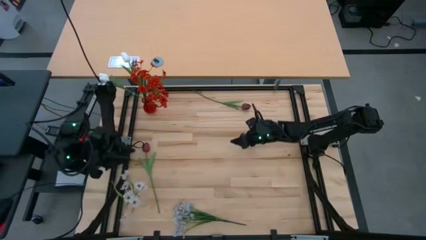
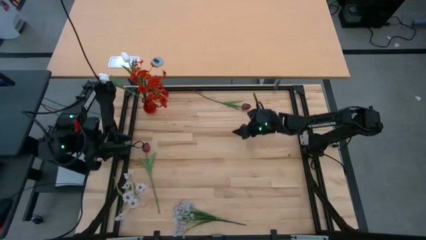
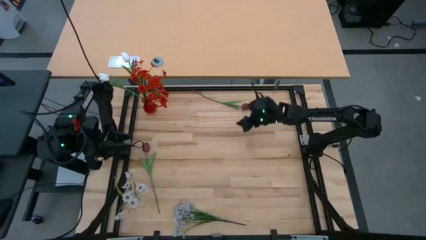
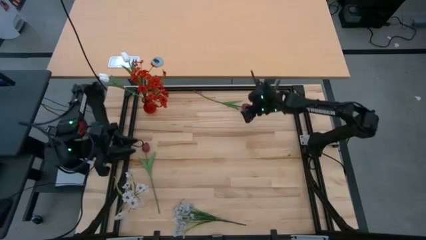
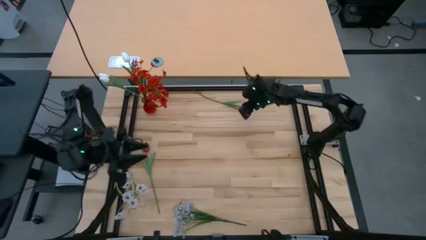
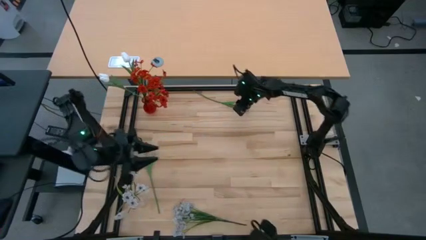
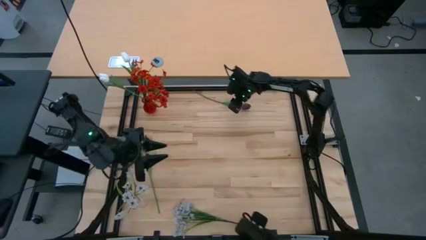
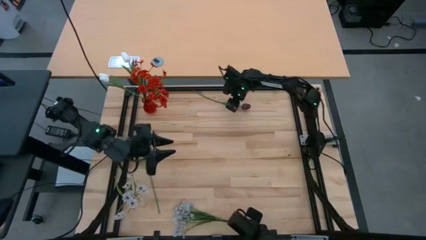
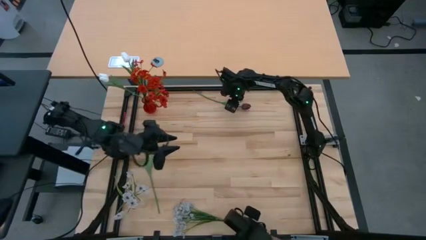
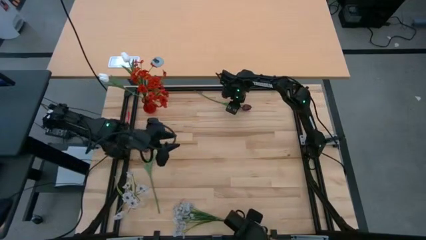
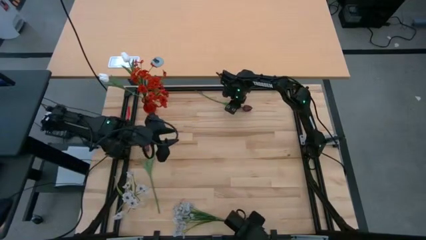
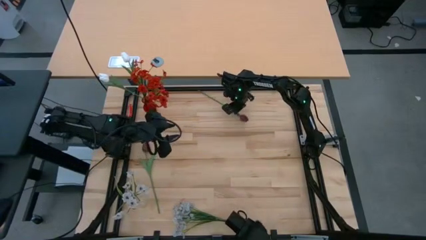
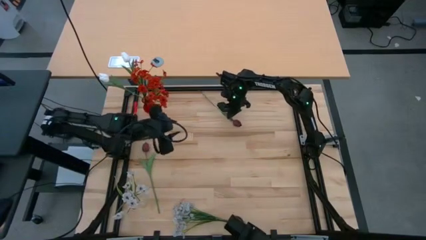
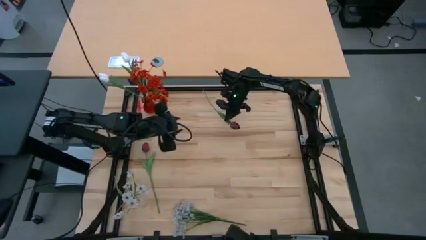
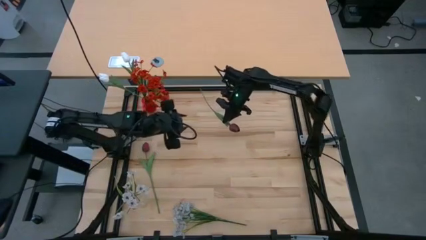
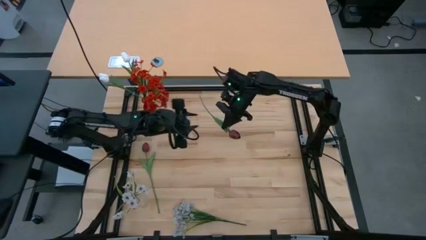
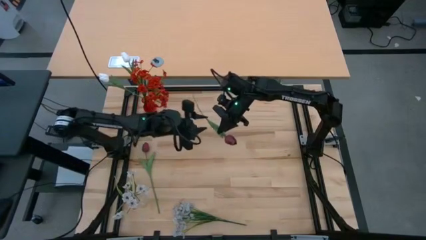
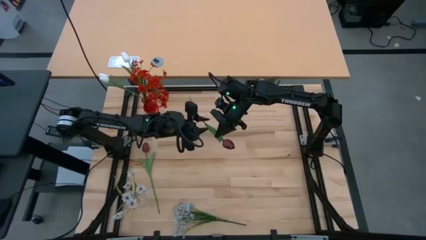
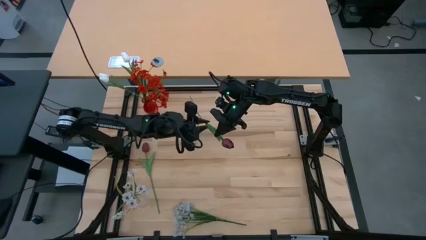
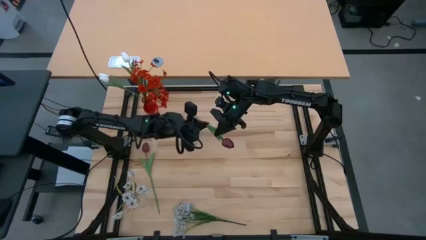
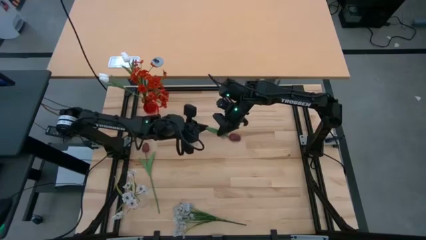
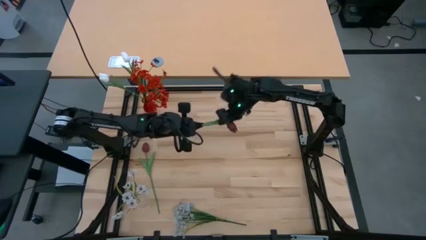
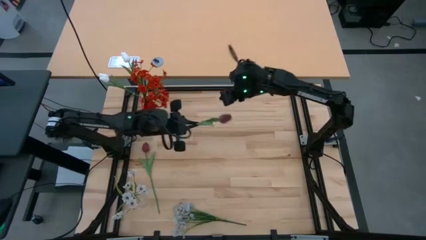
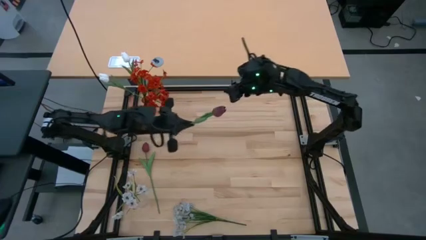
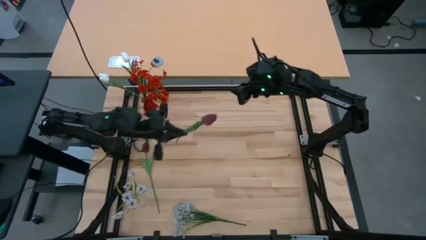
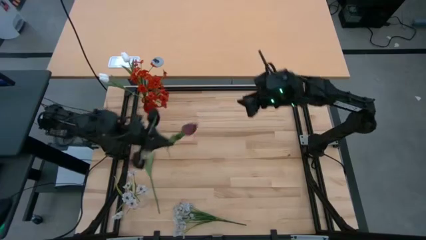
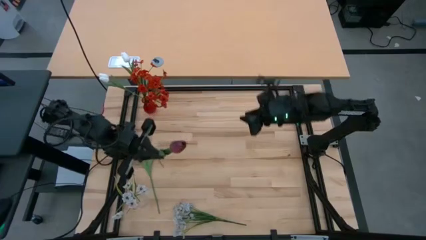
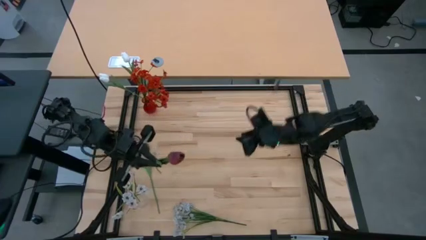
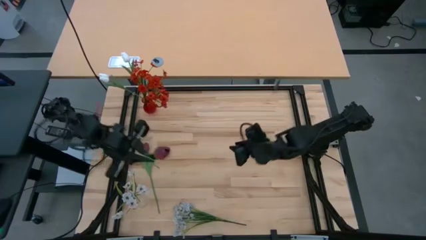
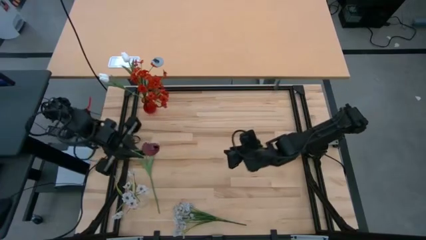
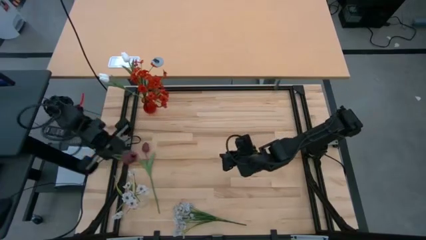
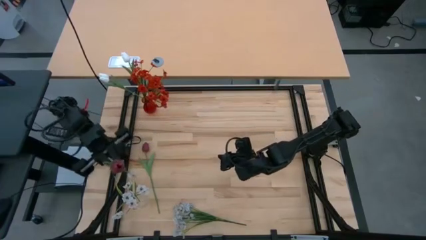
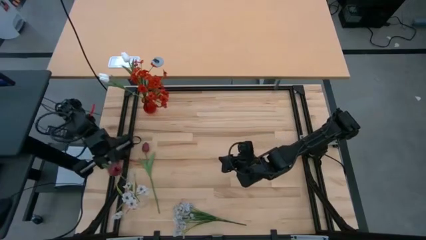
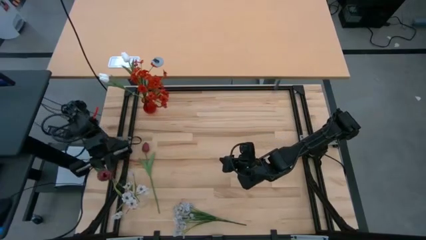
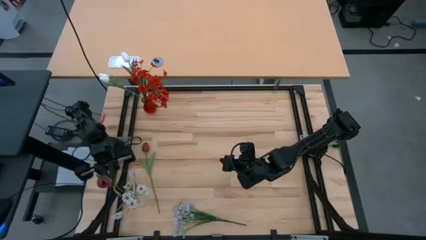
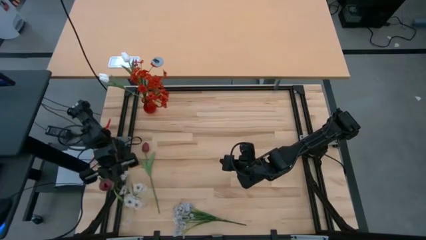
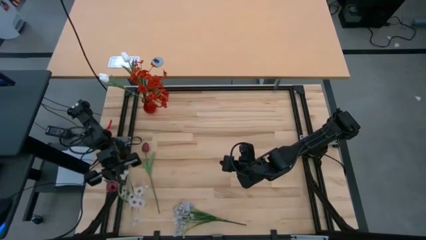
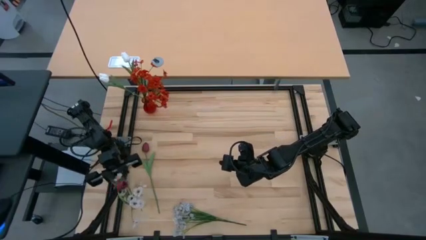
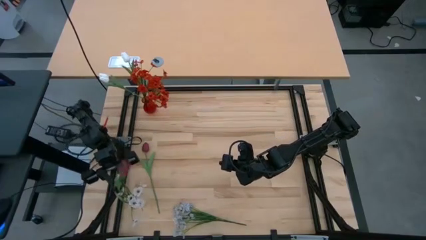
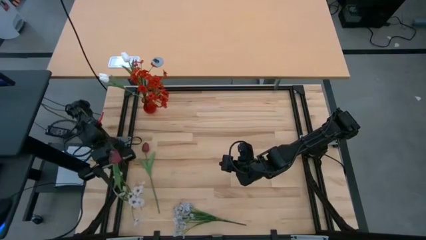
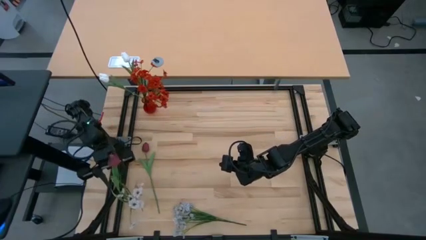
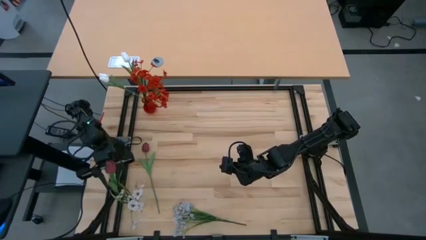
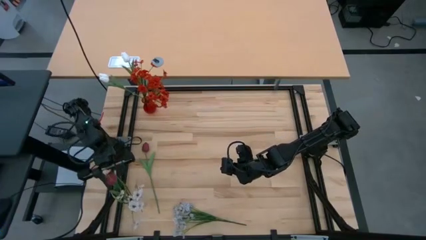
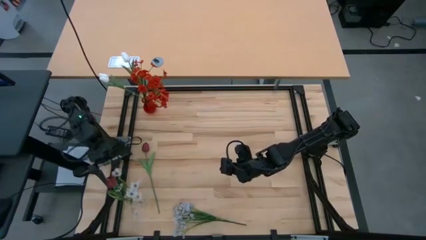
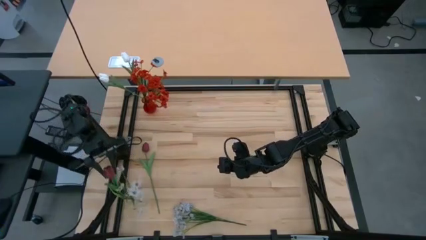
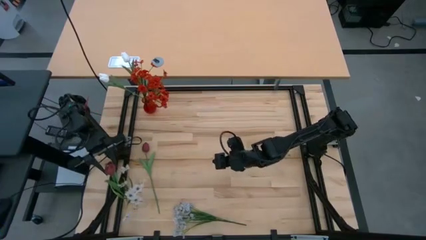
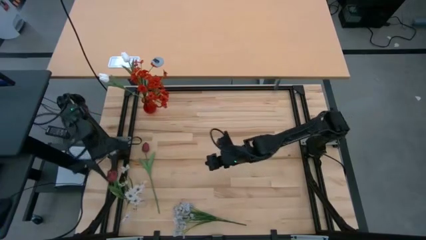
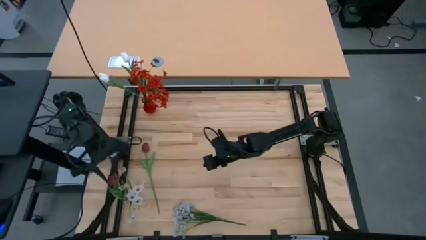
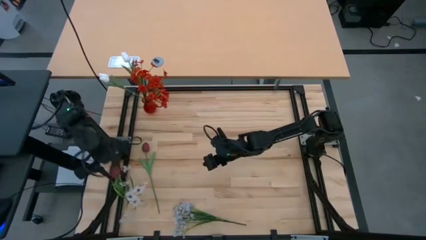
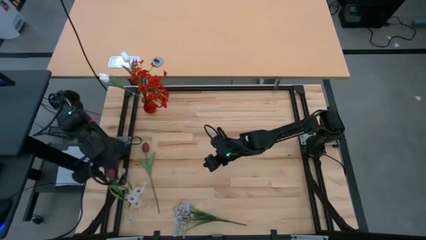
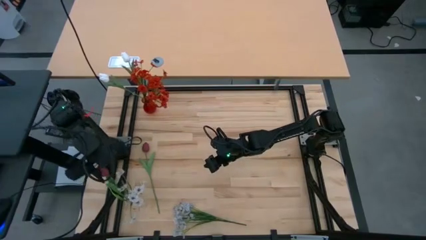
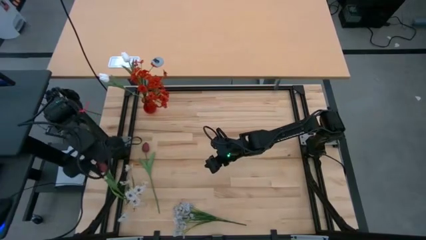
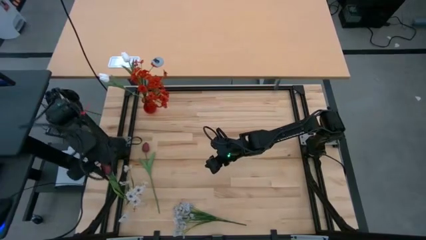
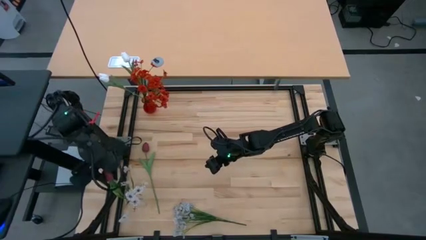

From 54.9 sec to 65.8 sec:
Task: Sort flowers into vase by color
Put the top red tulip into the transparent vase

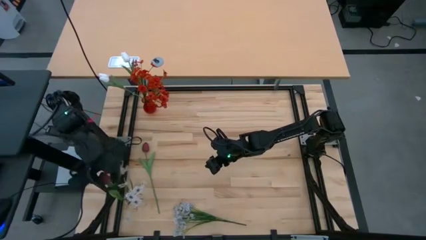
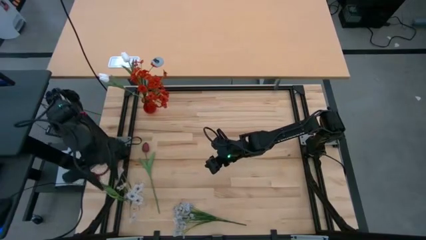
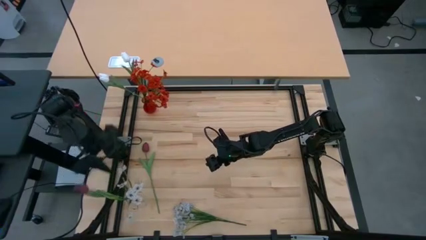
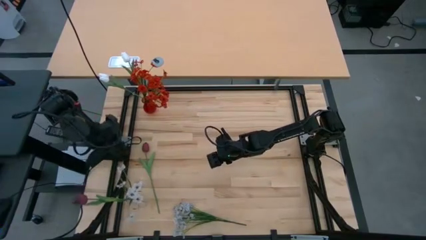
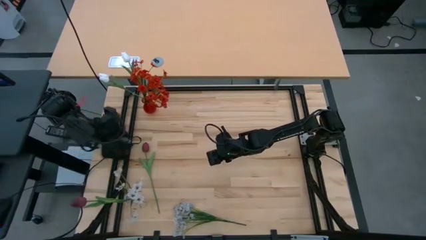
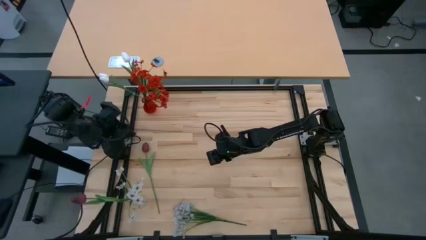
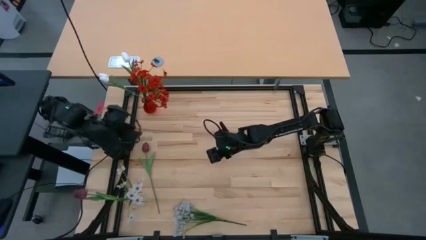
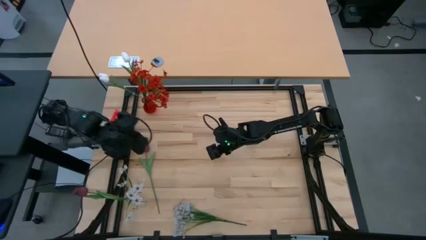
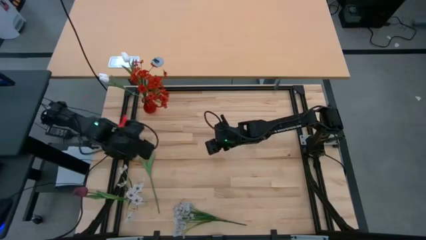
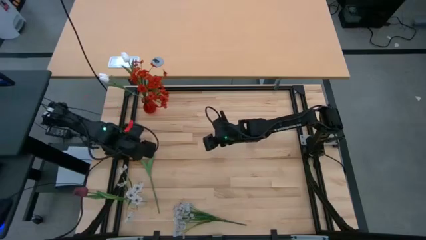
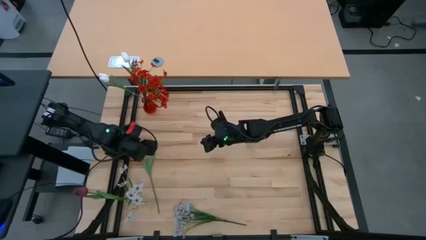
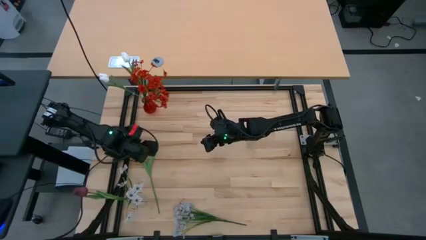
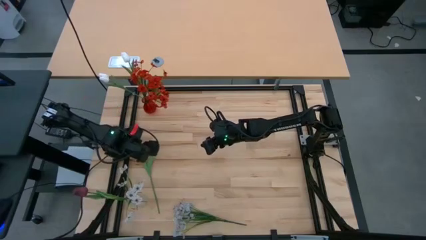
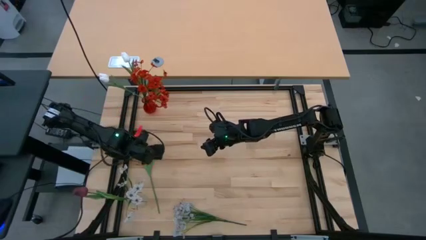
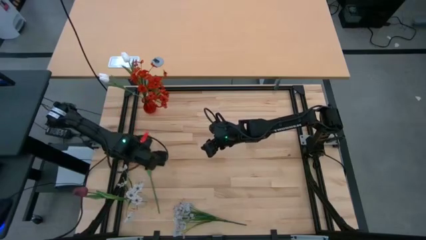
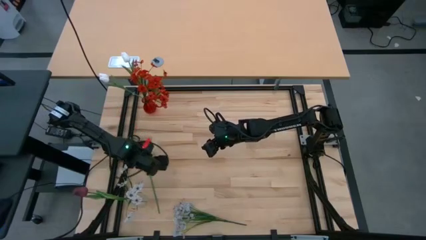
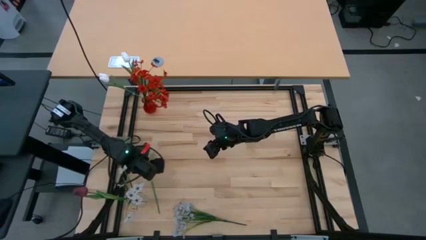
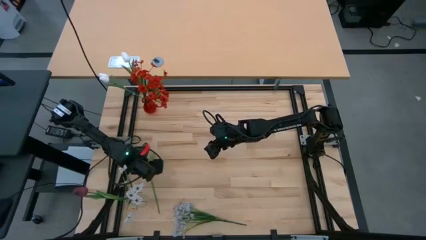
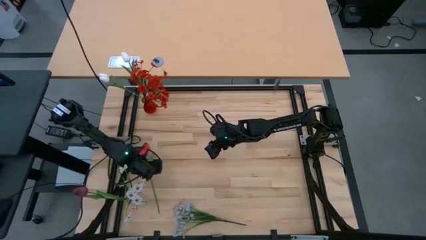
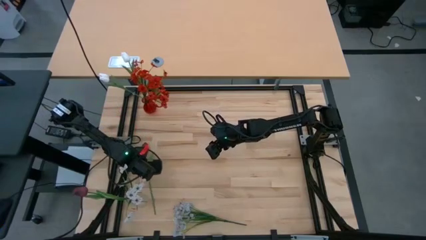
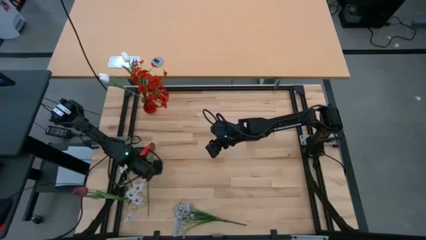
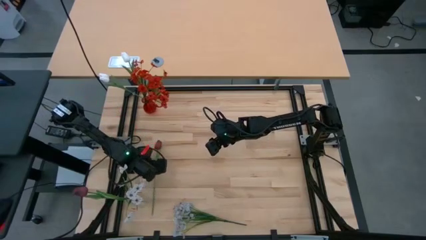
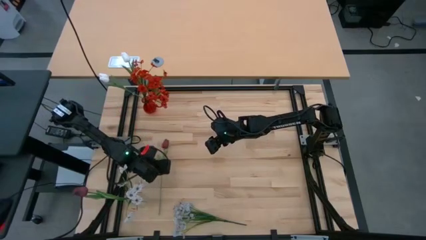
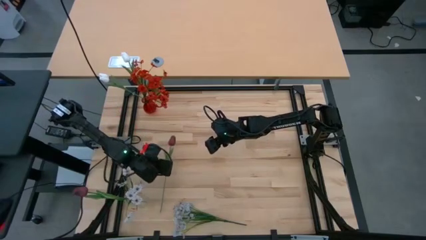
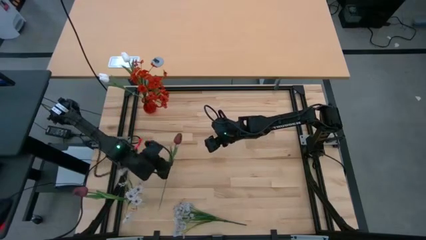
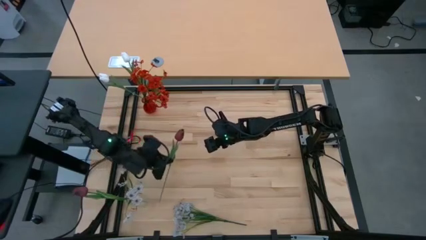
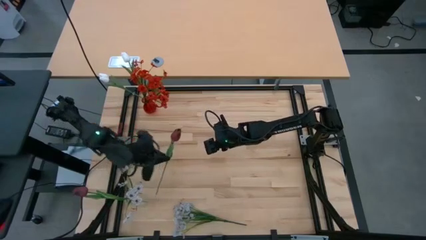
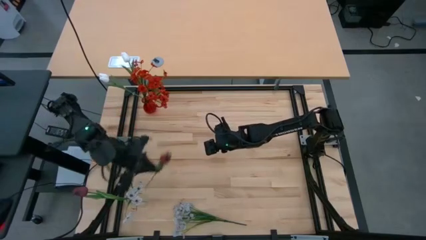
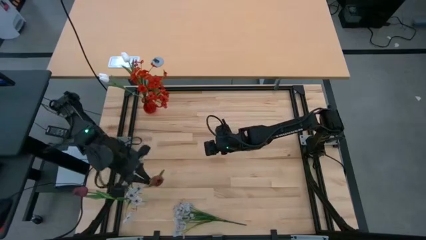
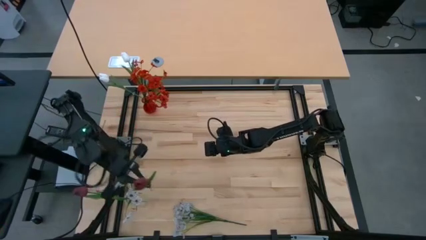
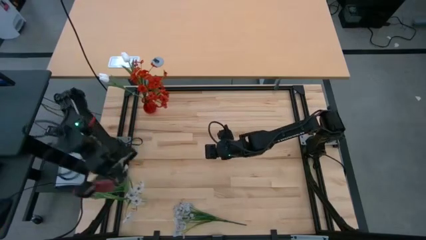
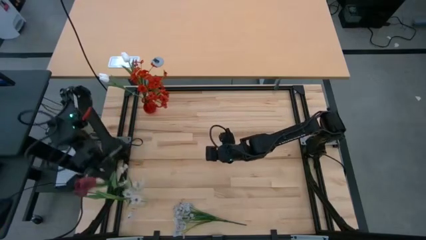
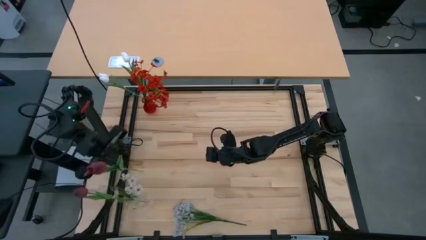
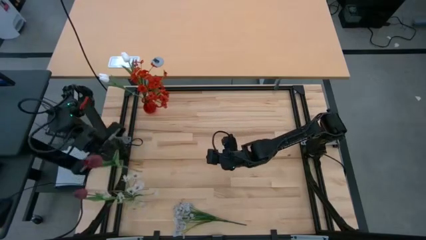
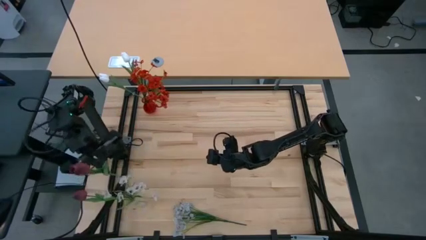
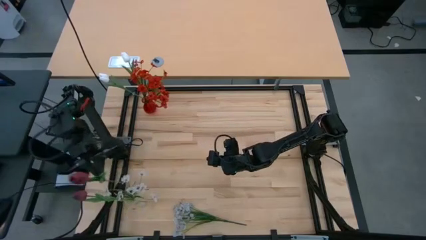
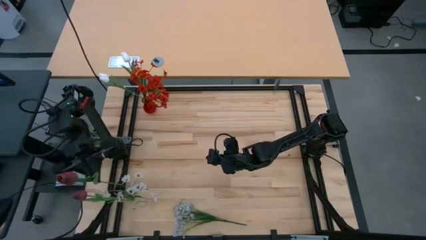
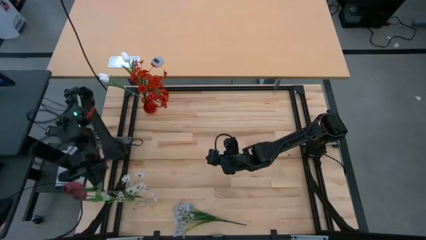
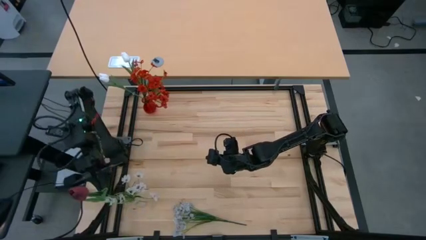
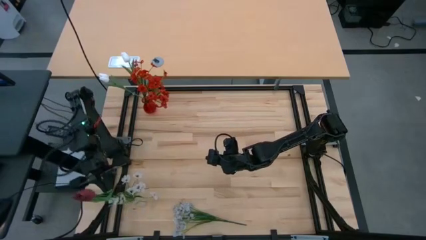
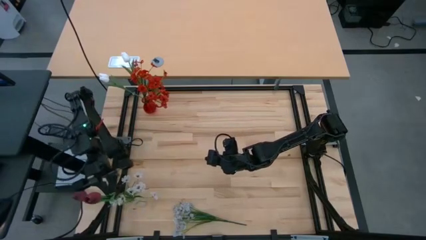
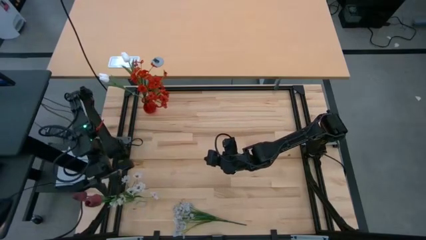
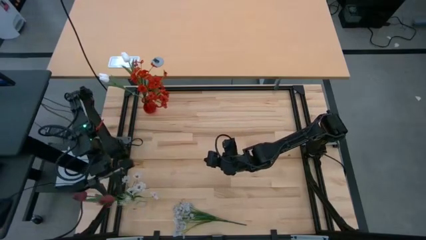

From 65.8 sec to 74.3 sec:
Put the red tulip into the transparent vase
